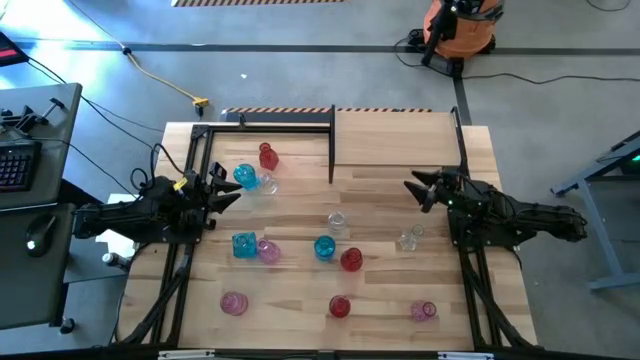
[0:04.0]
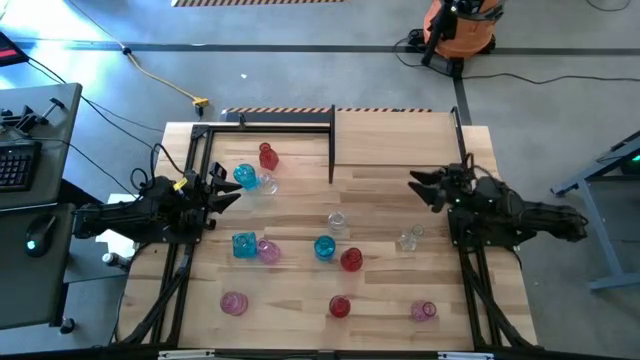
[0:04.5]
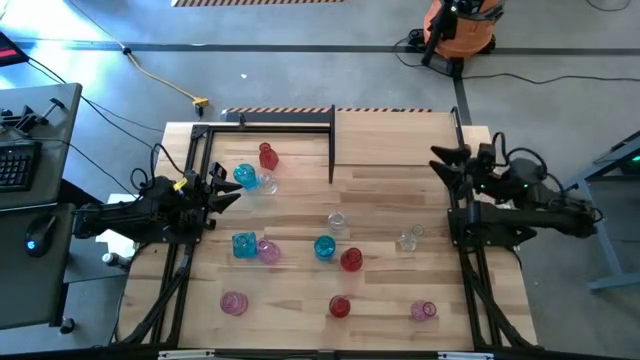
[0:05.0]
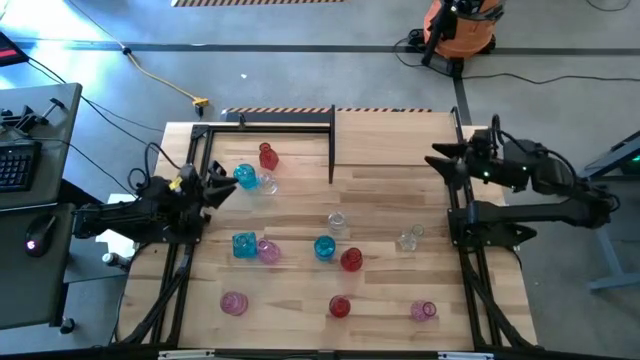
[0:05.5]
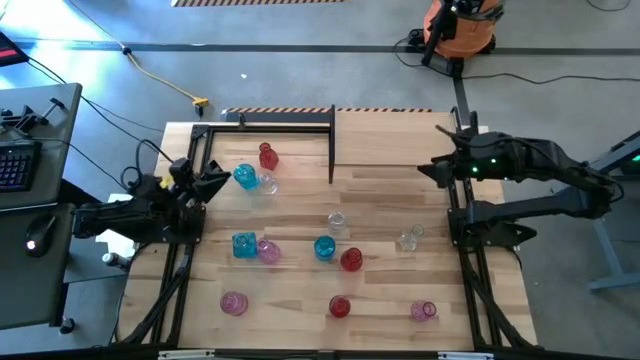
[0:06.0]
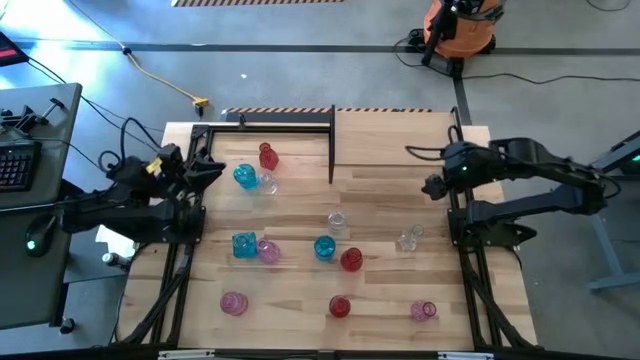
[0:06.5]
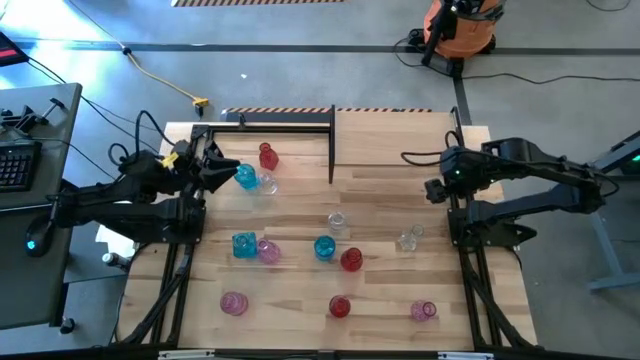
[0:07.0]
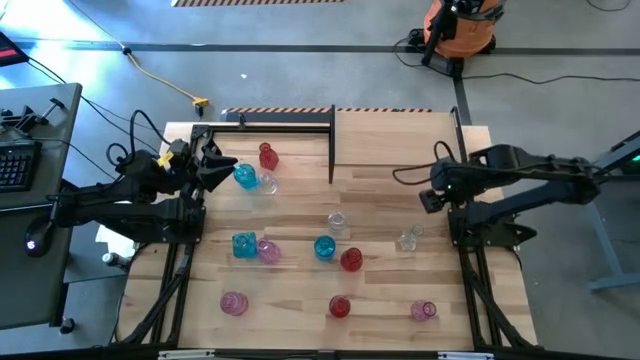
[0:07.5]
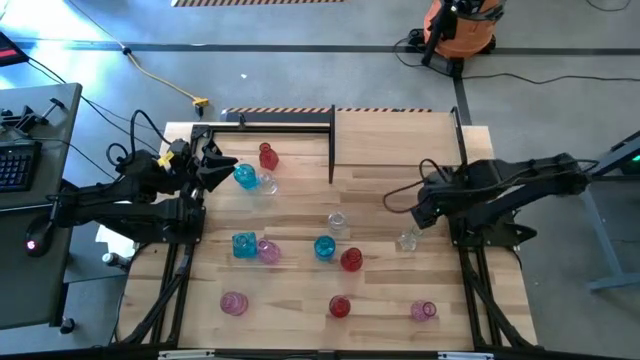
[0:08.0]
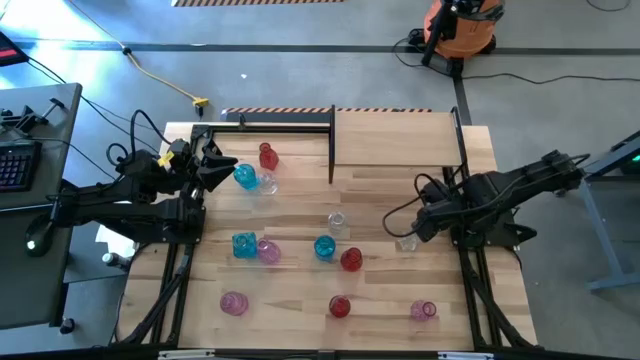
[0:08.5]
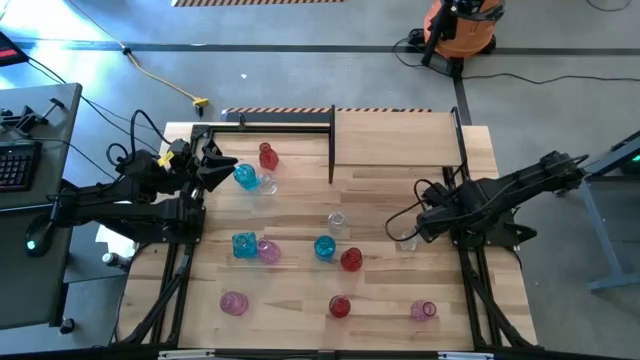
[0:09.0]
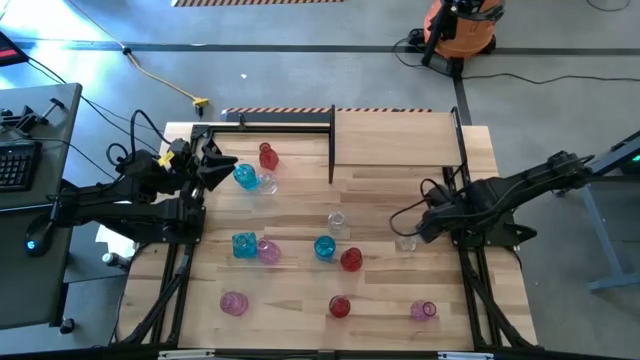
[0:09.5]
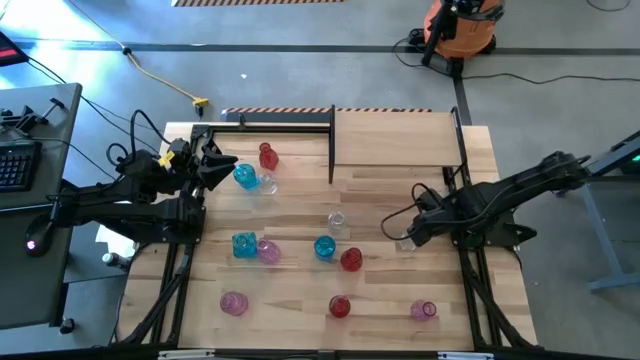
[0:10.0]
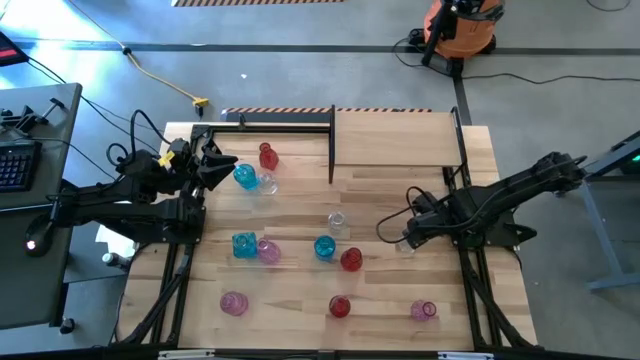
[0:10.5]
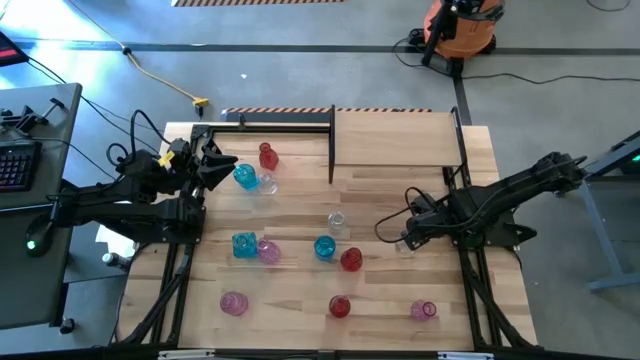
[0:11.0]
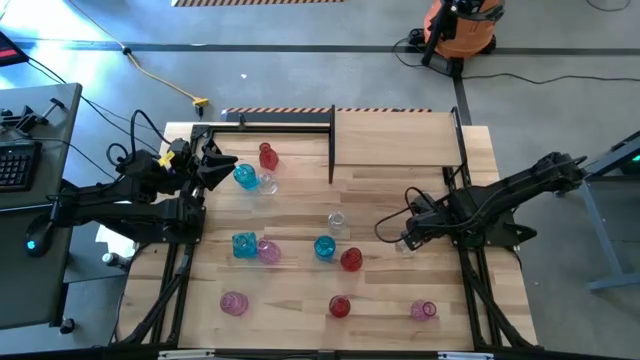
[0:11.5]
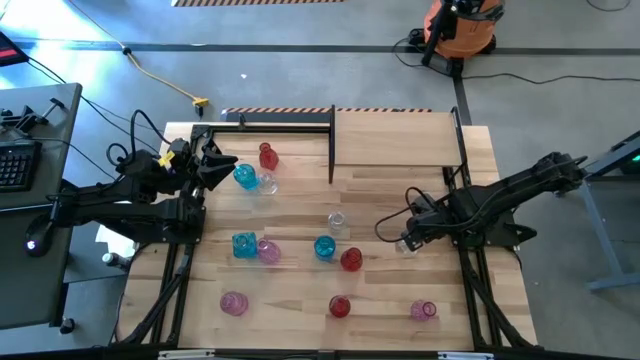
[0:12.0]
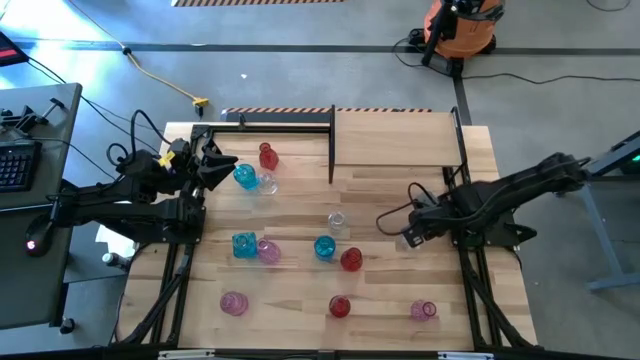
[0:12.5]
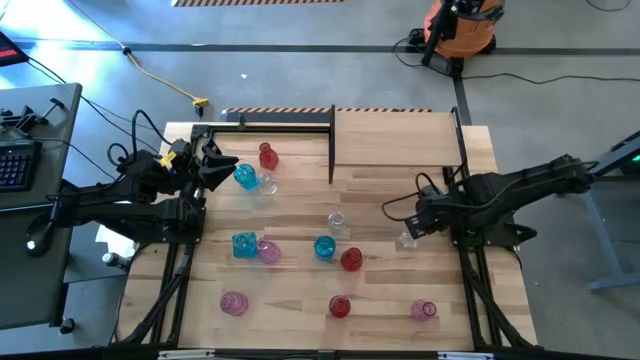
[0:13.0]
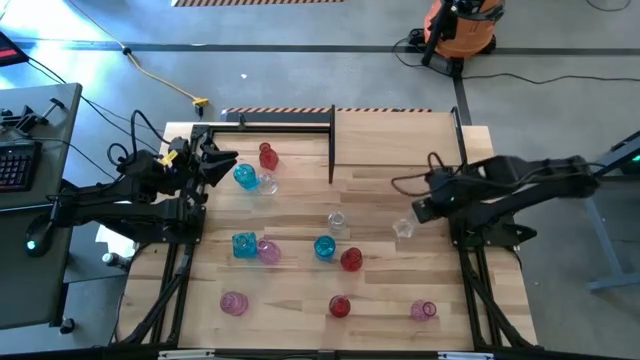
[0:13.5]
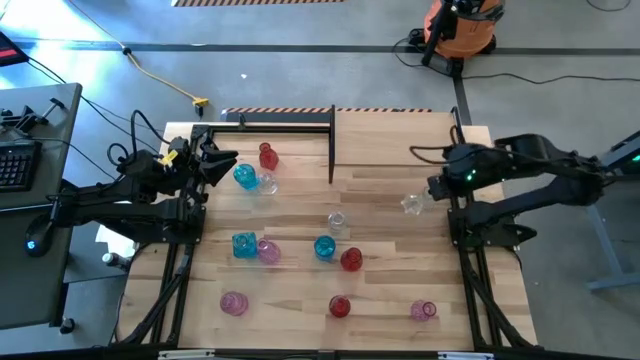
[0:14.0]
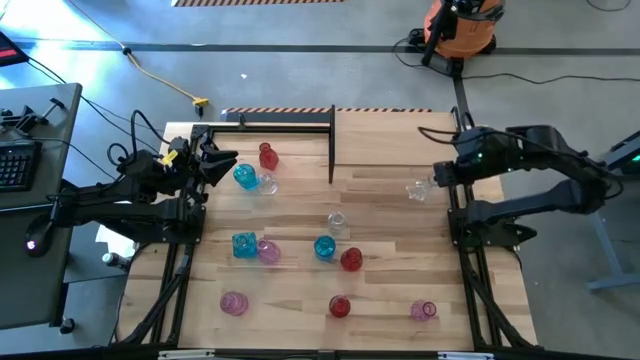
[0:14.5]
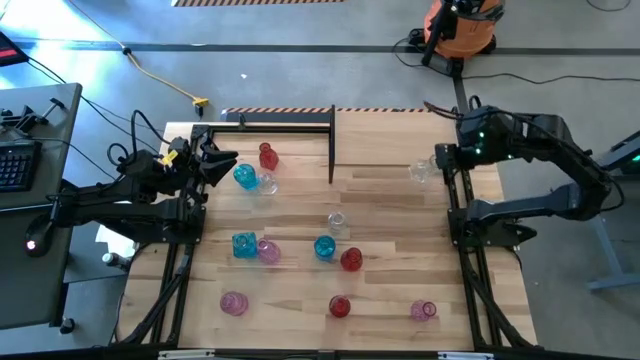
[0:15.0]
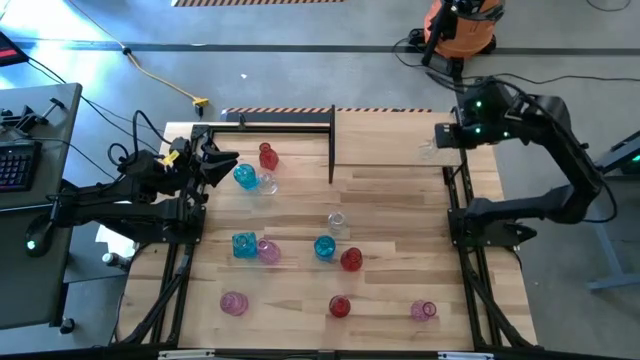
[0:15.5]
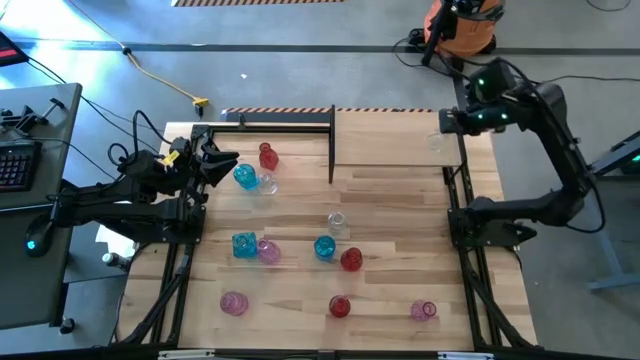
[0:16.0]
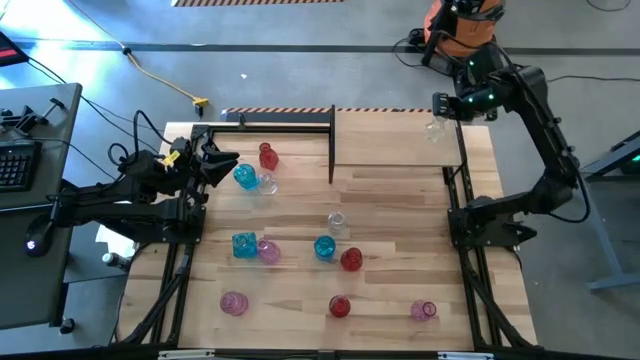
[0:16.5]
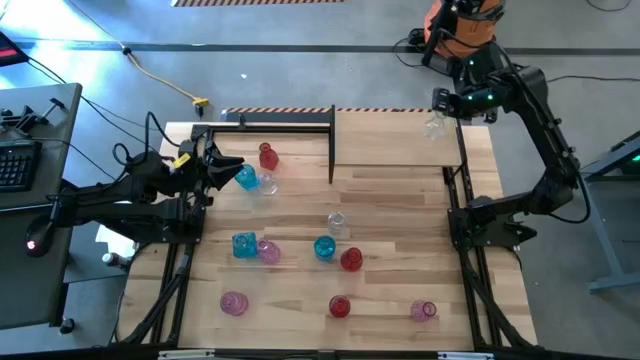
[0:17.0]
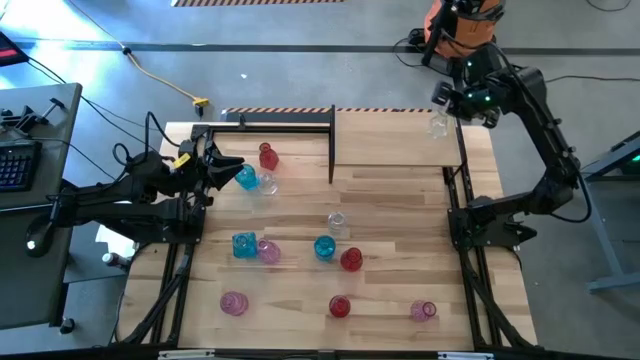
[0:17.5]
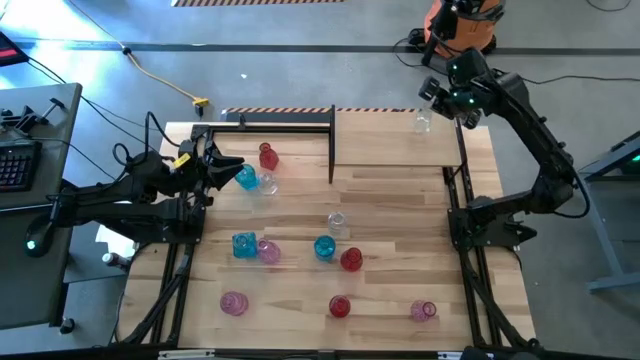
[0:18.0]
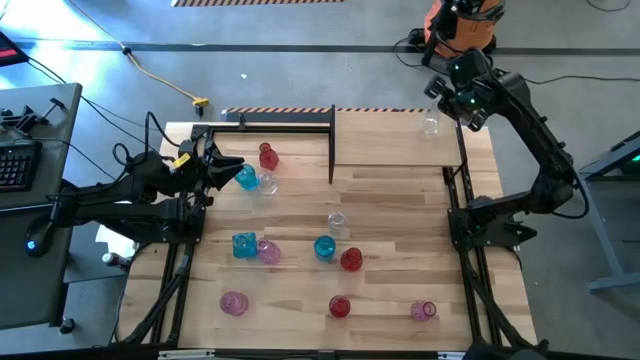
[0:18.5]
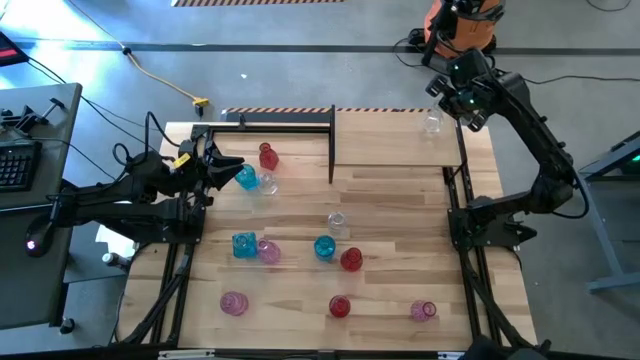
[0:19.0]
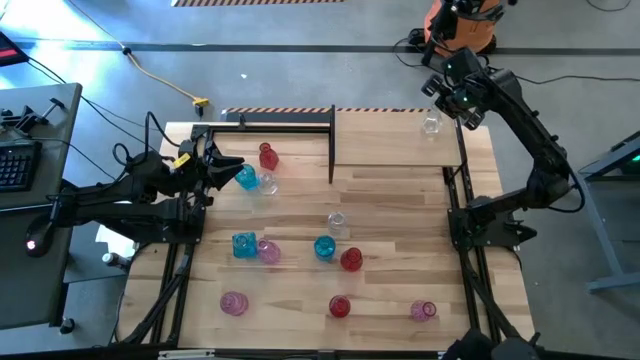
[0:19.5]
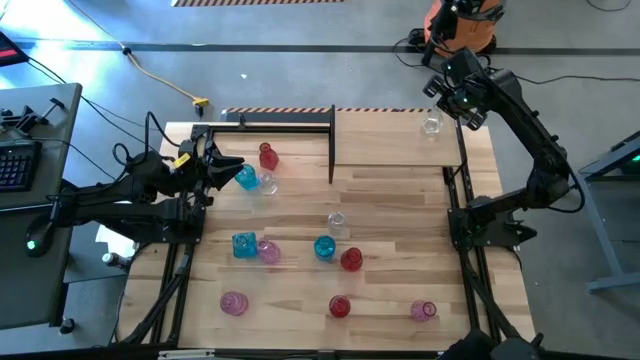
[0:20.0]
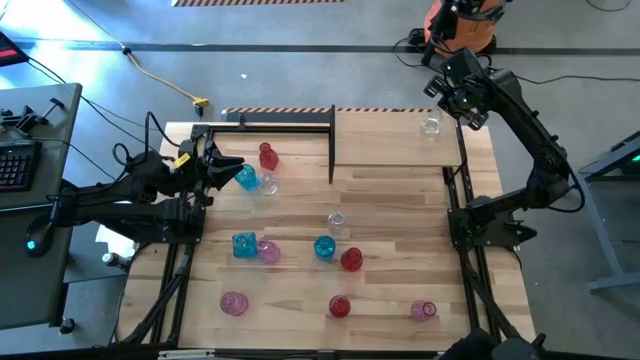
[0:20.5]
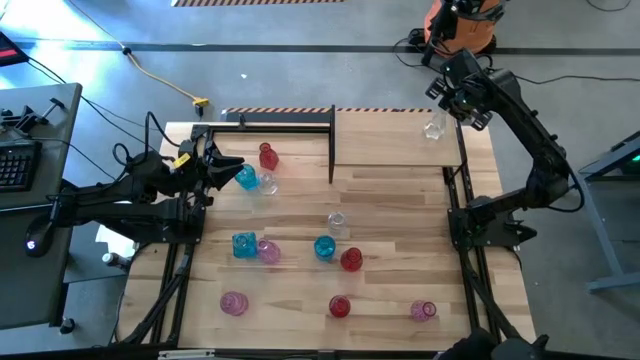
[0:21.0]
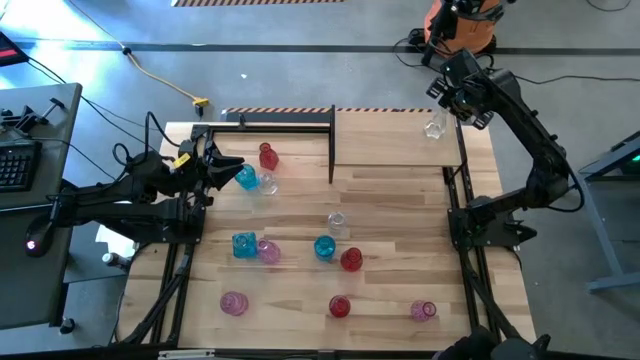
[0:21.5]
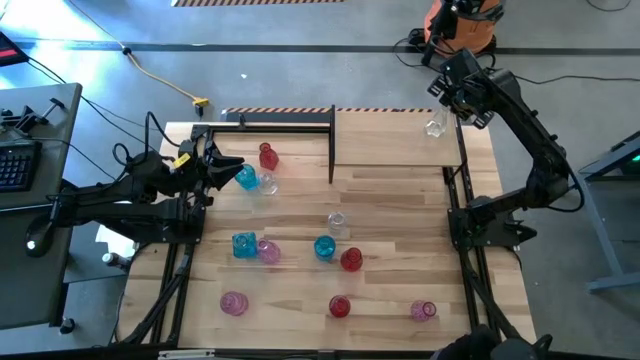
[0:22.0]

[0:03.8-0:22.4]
Task: sort vases onto shelf
Put the bottom right transparent vase on the shelf

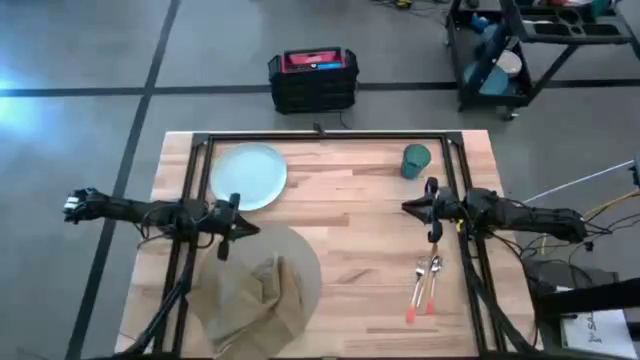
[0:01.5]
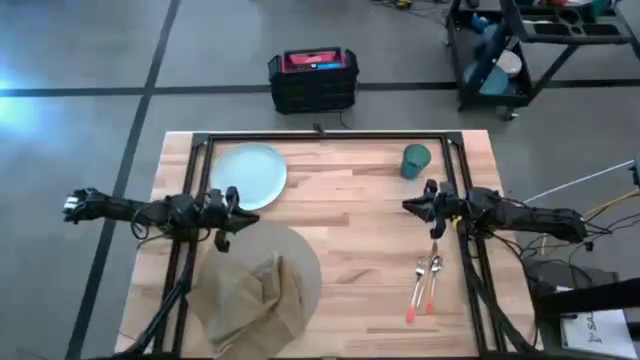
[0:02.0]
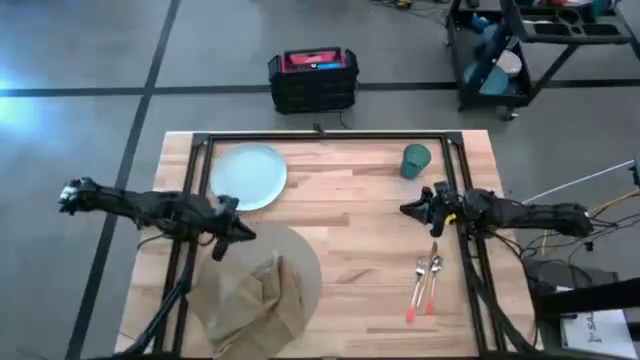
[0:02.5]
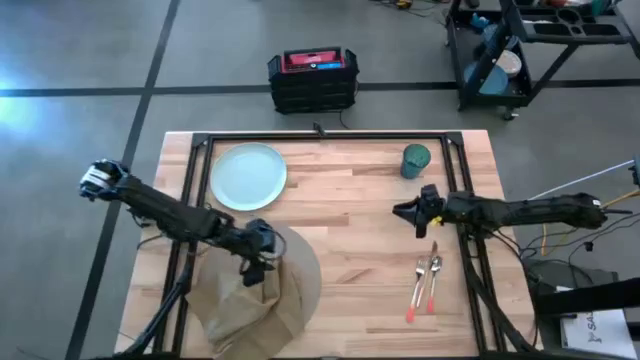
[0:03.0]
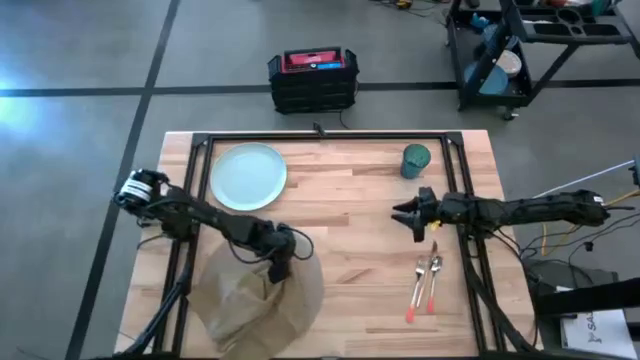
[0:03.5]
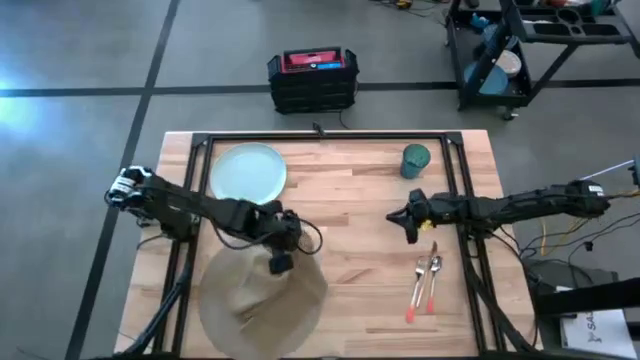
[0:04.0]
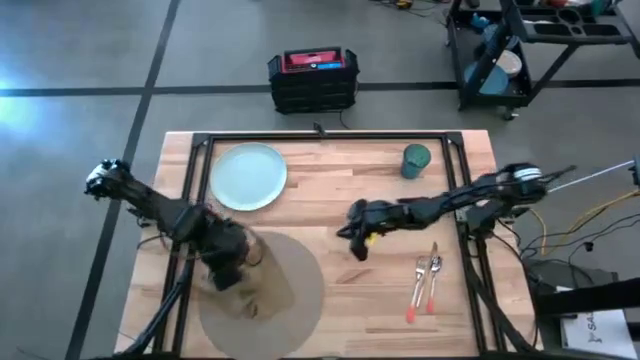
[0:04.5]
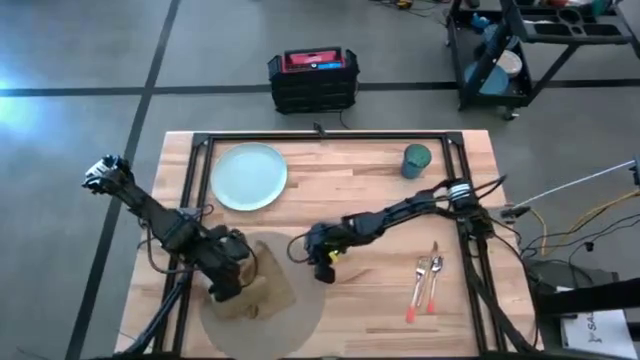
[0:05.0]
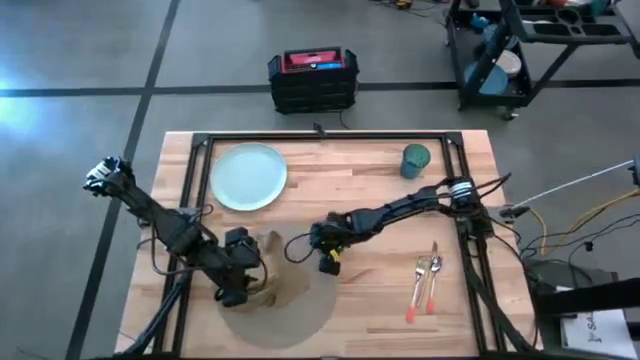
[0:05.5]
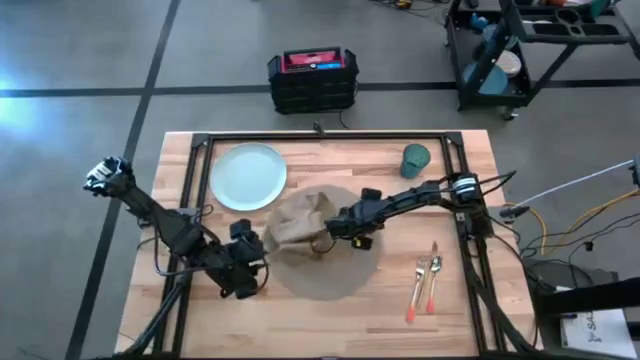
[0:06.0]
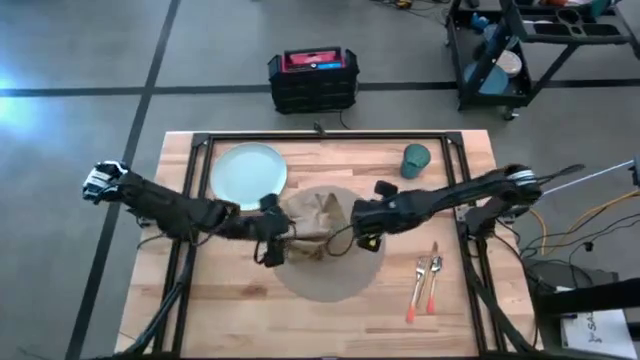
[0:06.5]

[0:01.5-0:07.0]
Task: Set table place
Move the grey tablemat to the center of the table
